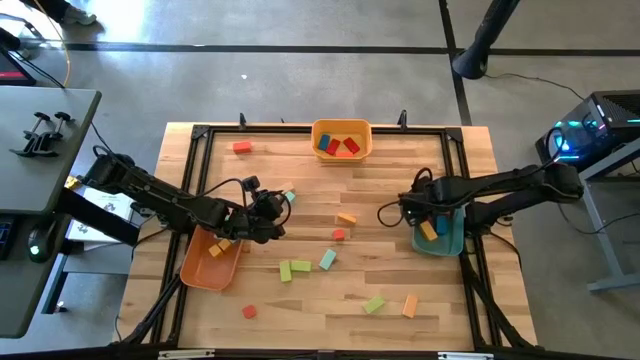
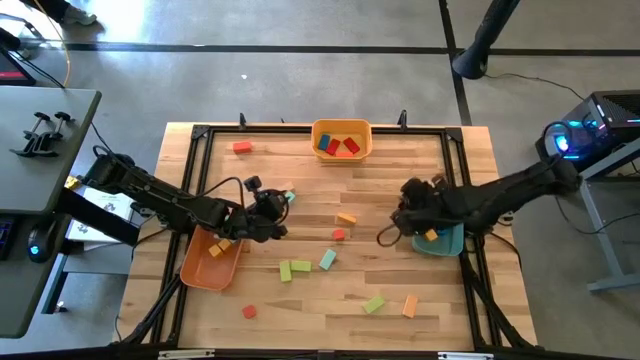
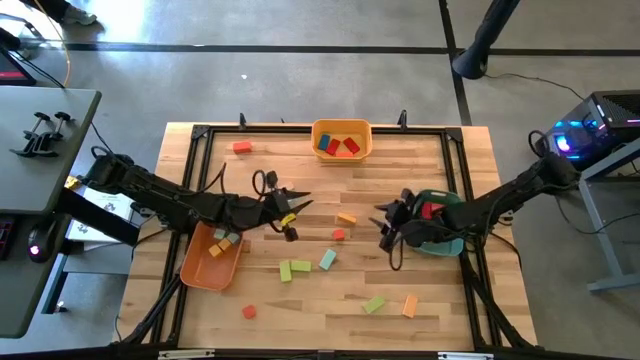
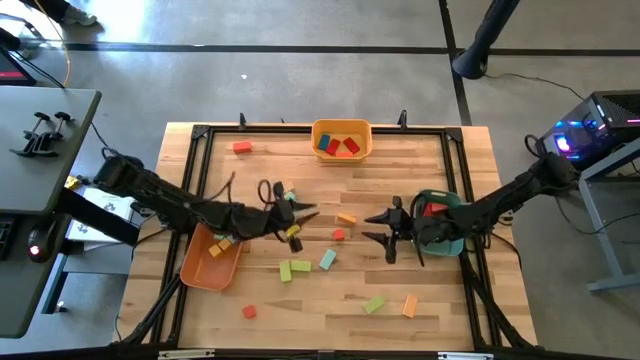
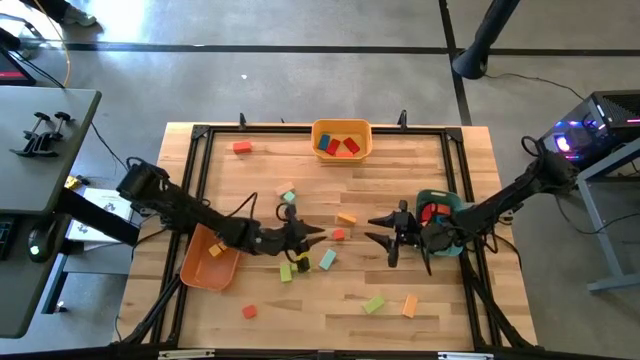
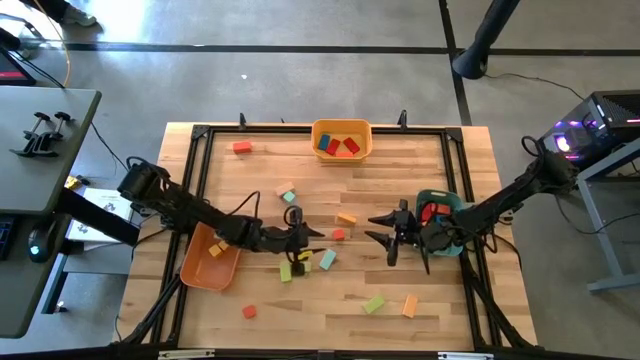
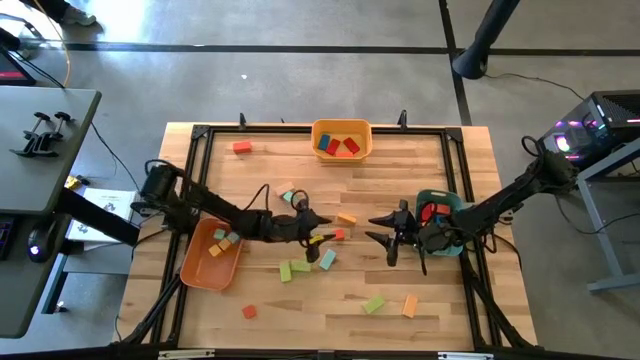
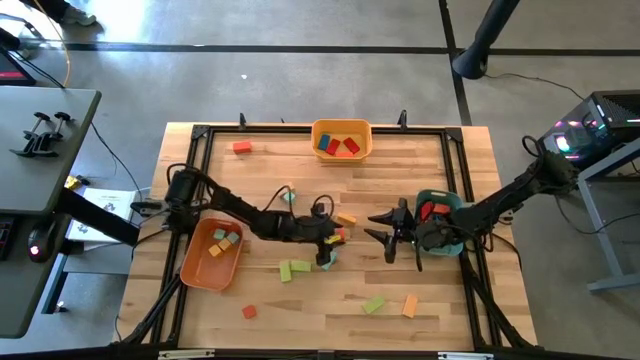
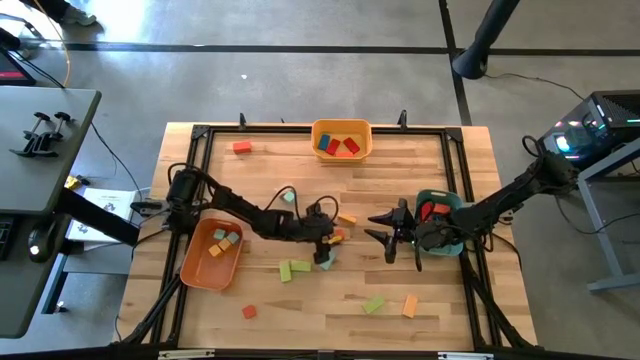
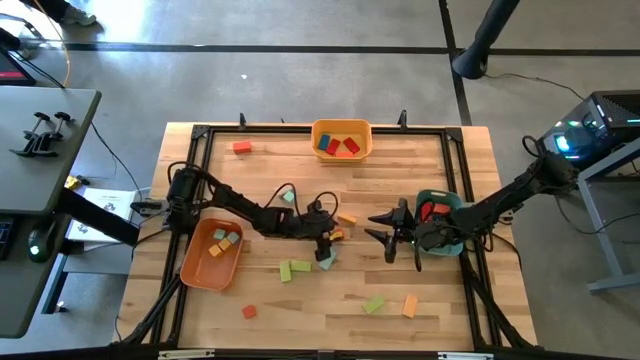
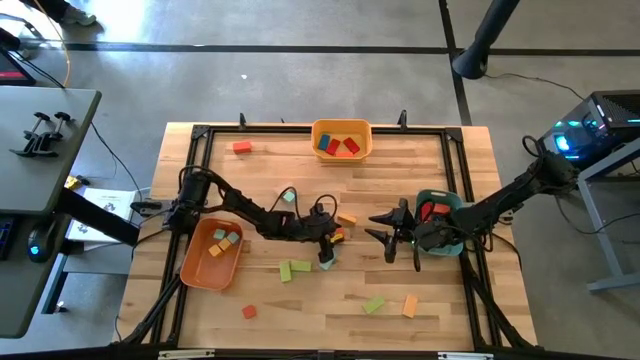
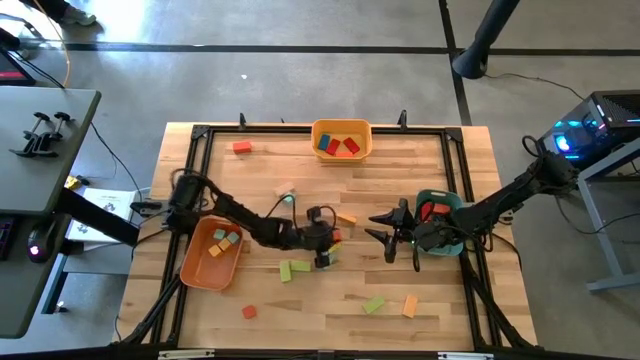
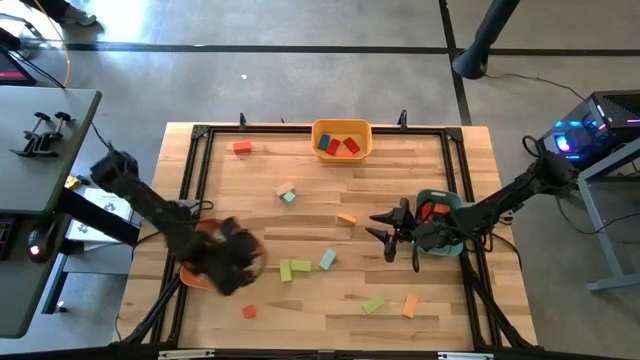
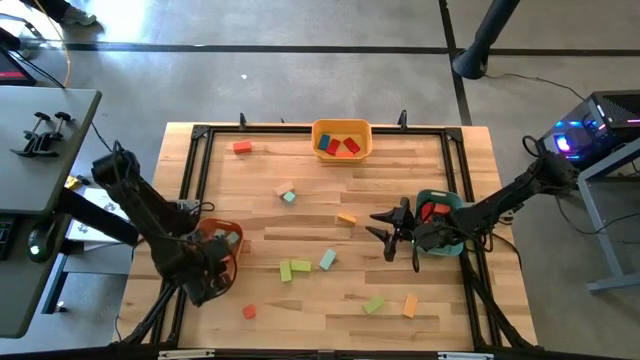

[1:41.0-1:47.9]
Task: Sort blocks by size
Put the orange square block into the orange bin

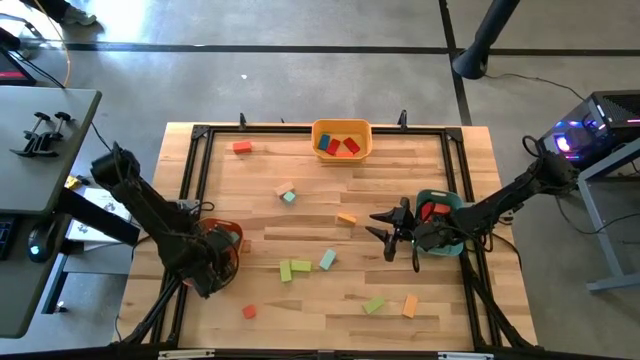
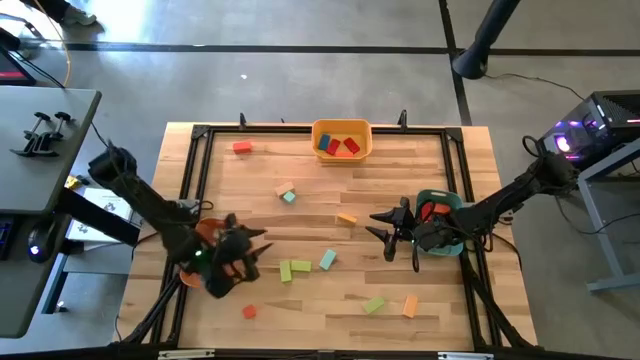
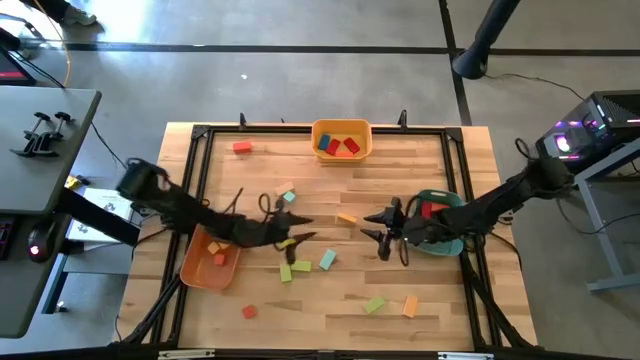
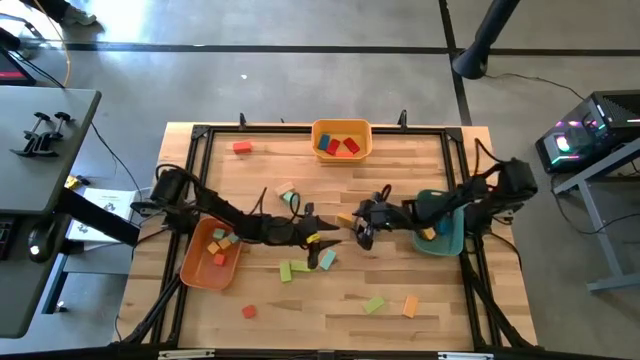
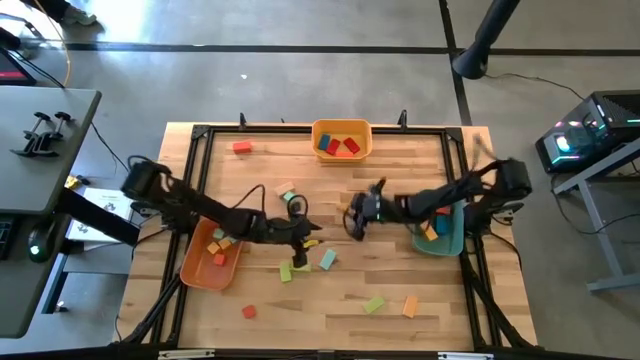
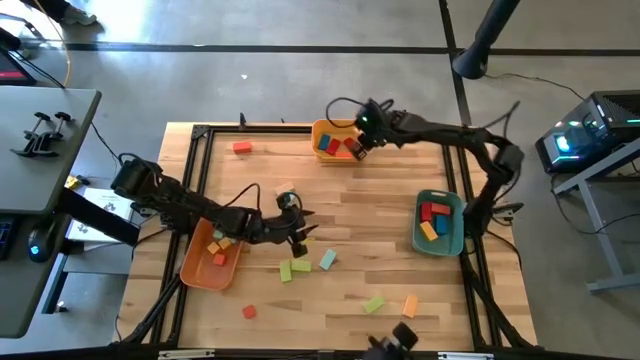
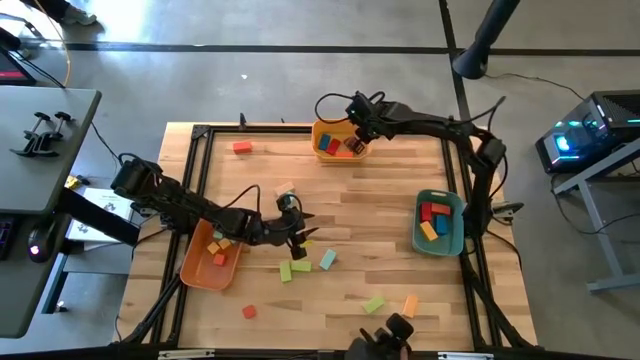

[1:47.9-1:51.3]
Put the yellow thin rectangular block into the yellow bin

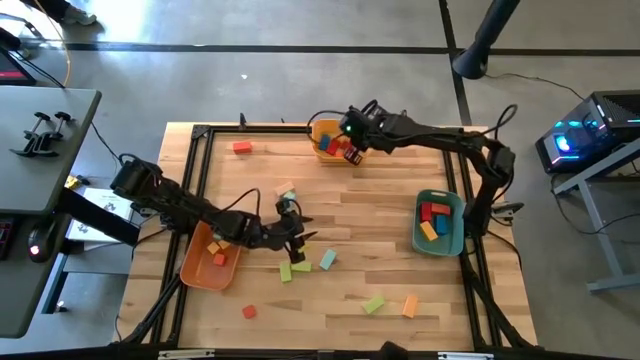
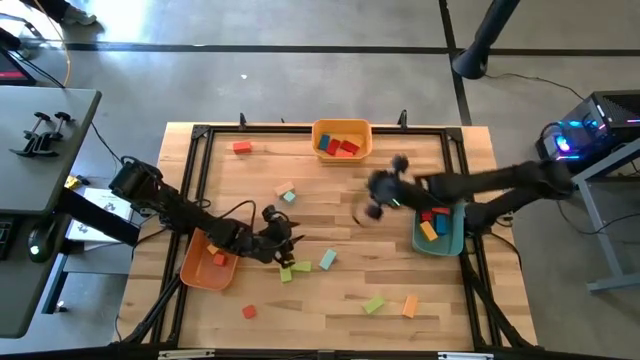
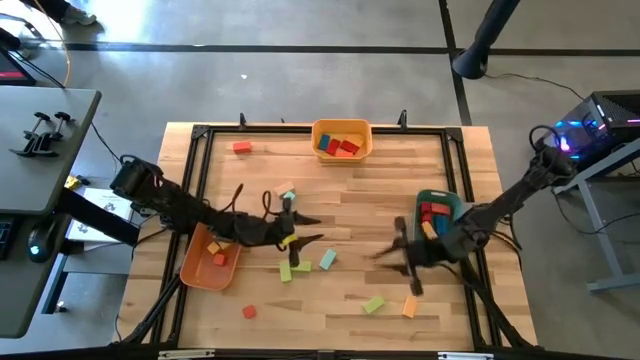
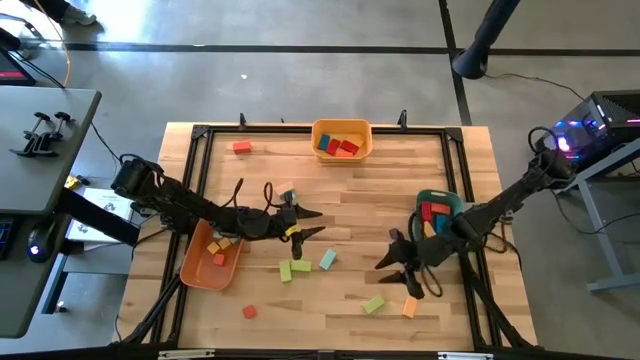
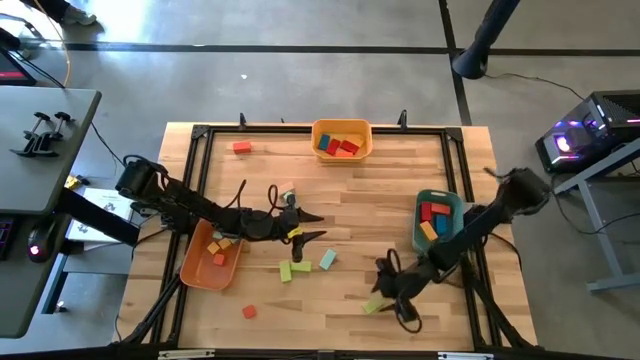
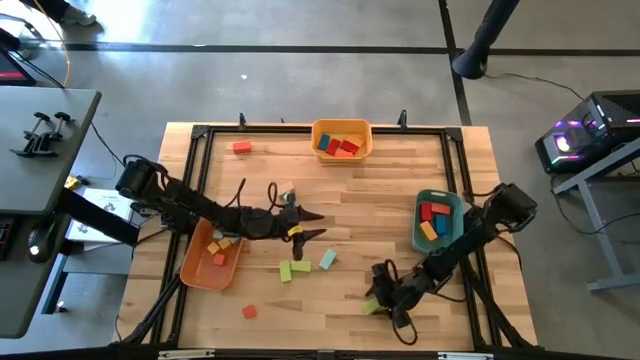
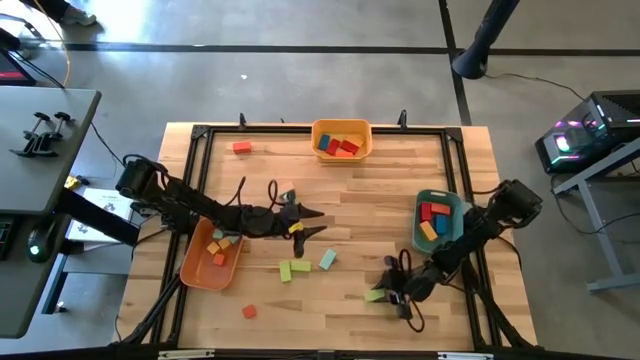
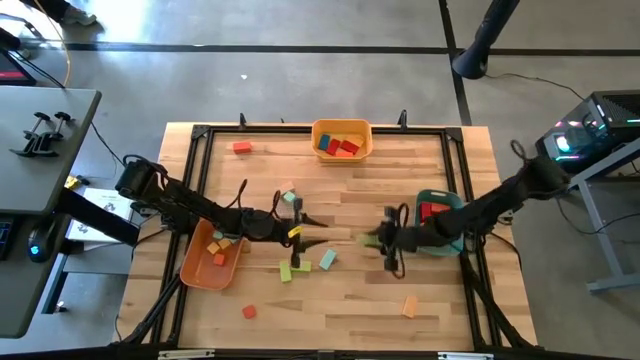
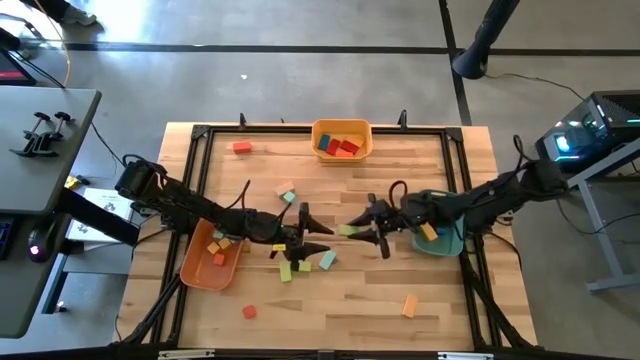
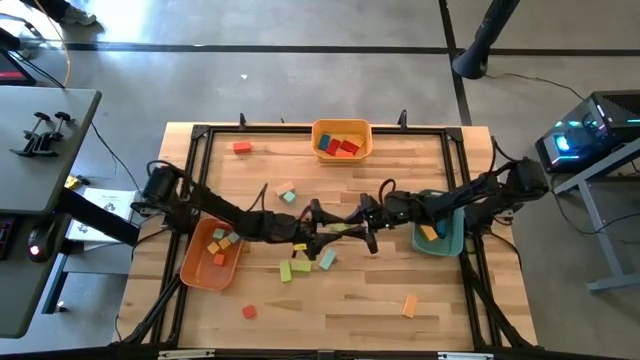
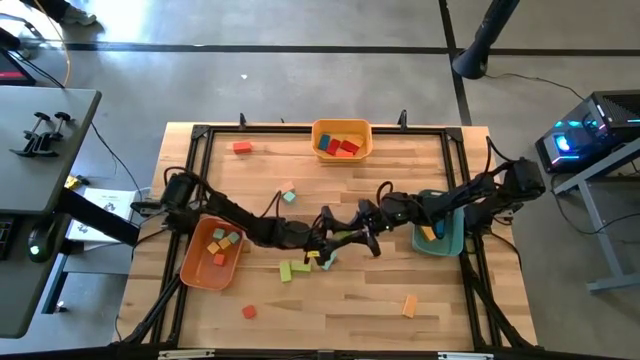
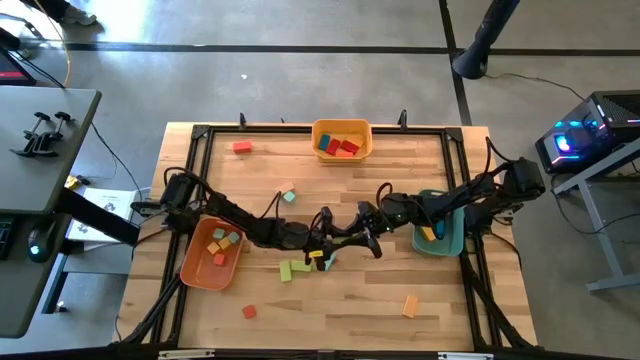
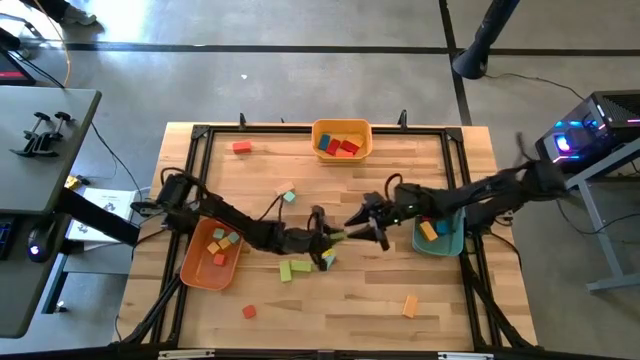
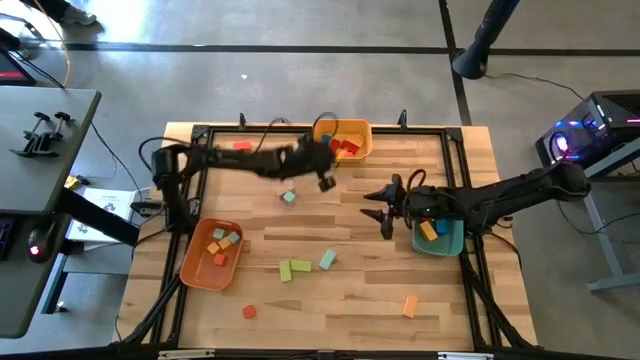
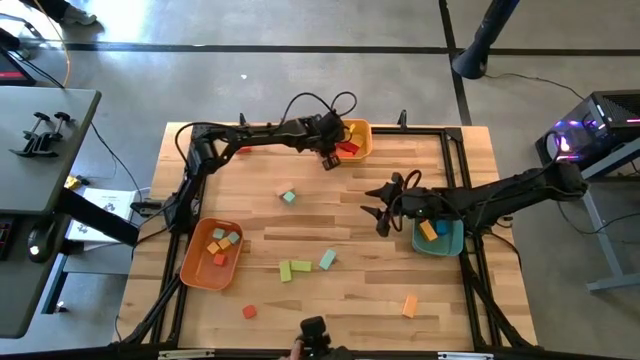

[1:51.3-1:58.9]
Put the green thin rectangular block into the yellow bin

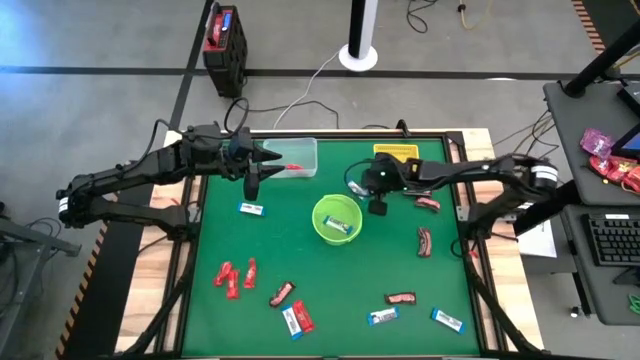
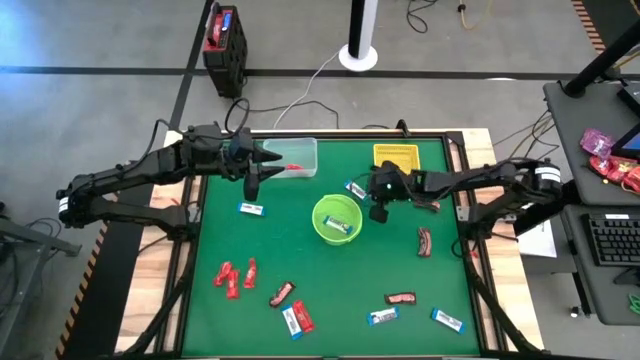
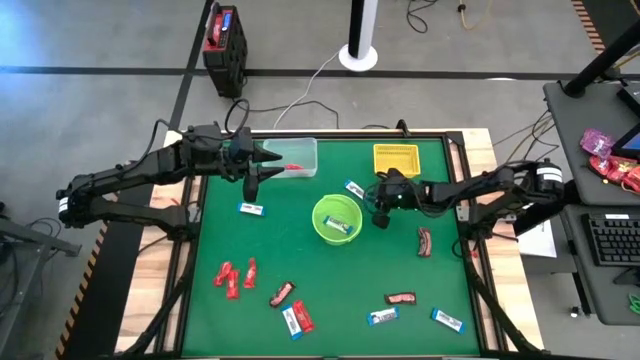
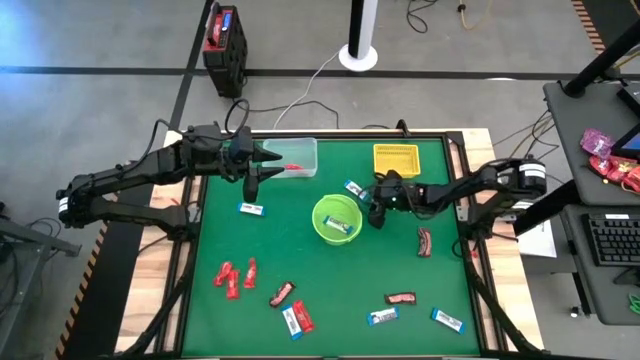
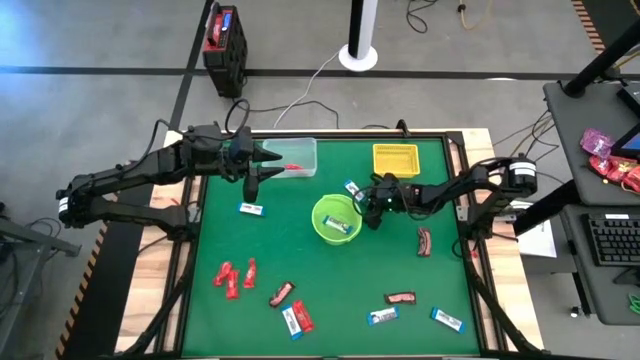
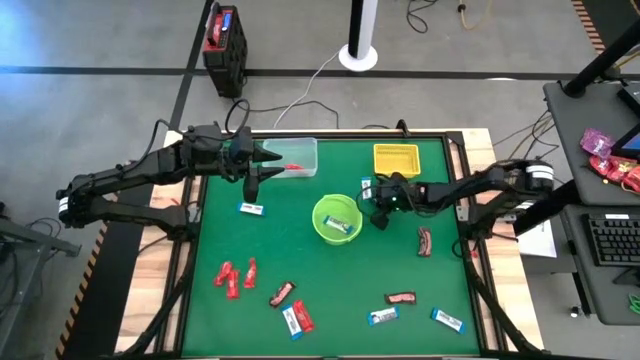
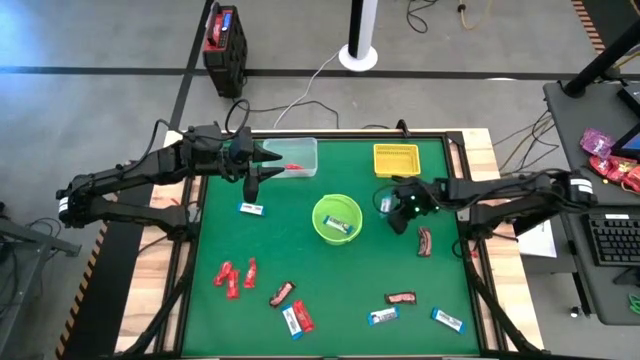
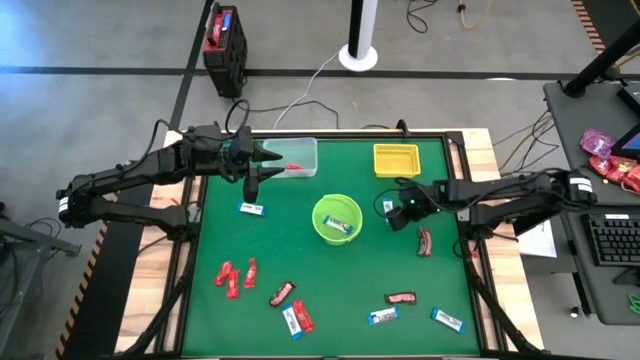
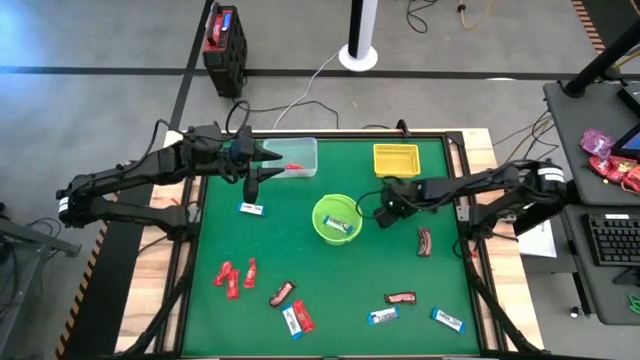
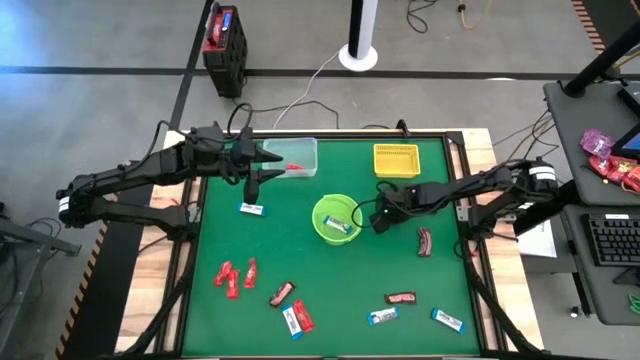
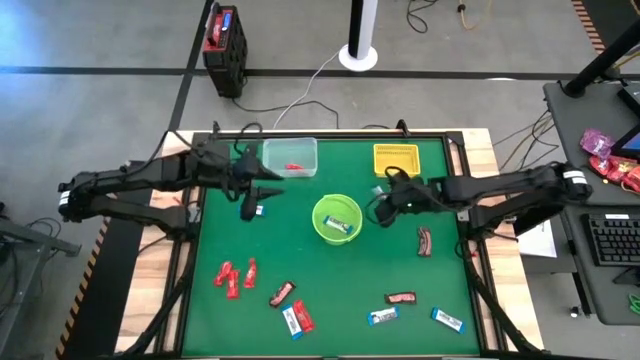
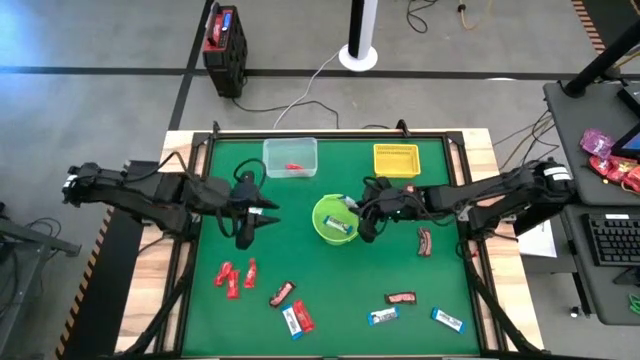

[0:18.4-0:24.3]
Task: Sort candy by brand, put in halloween buckets
Put the white chocolate into the green bucket
